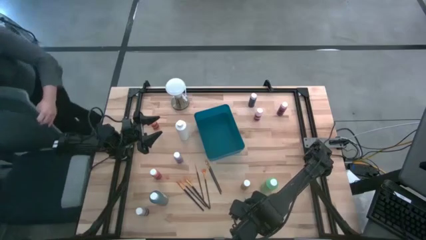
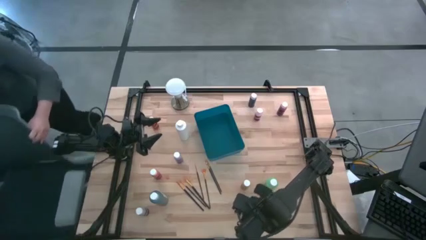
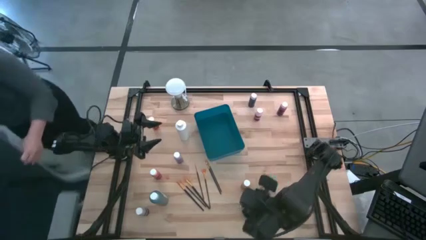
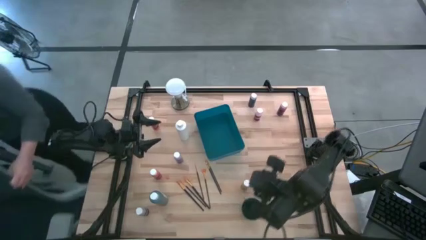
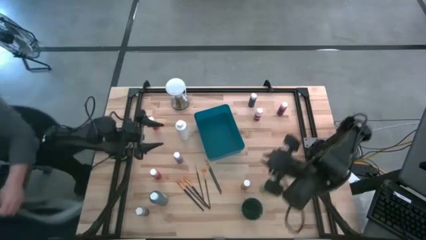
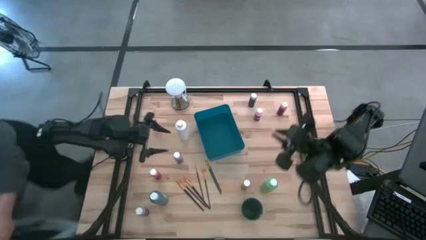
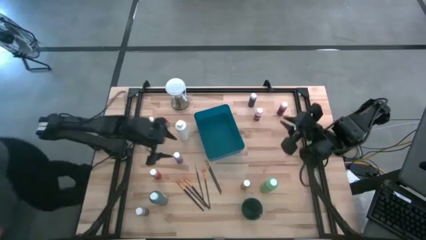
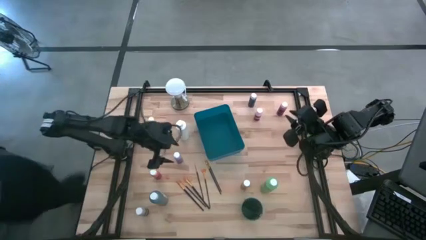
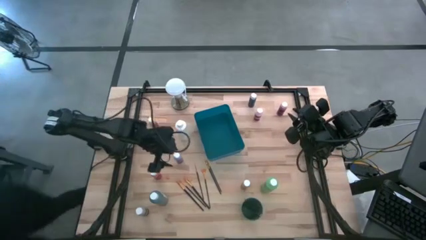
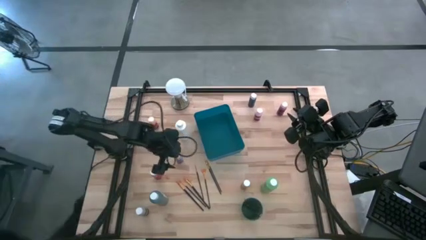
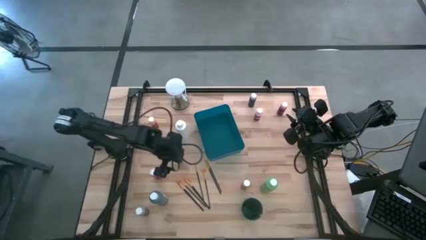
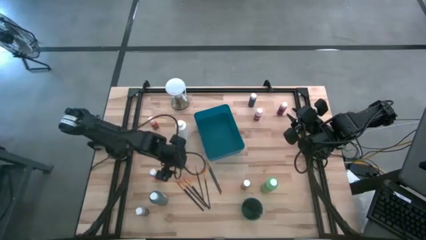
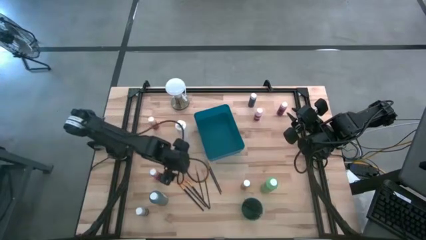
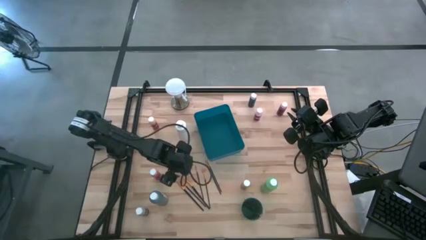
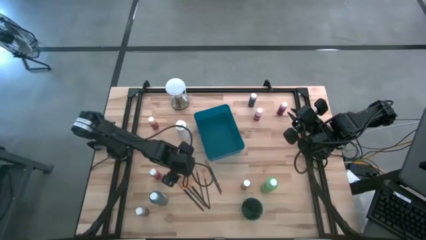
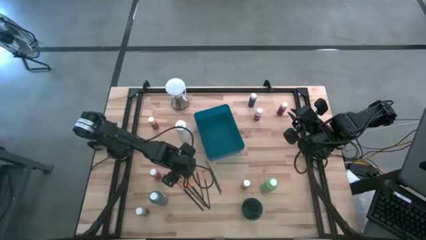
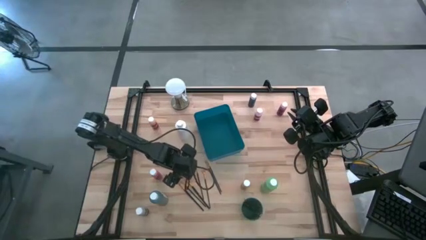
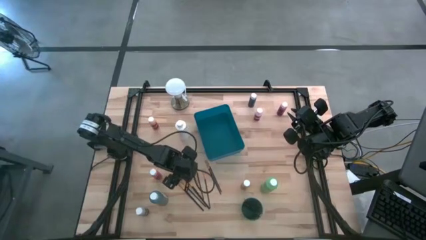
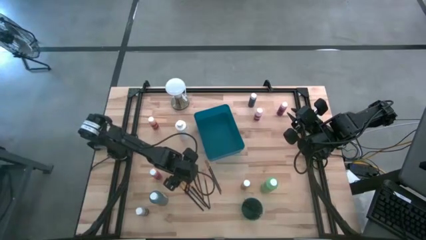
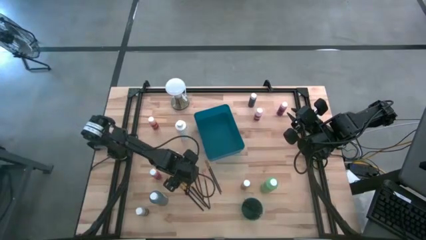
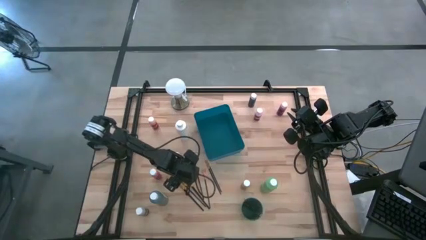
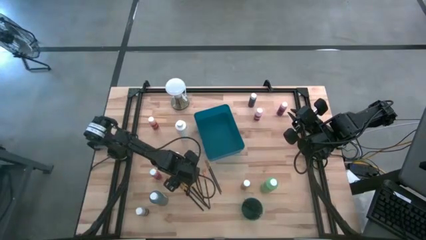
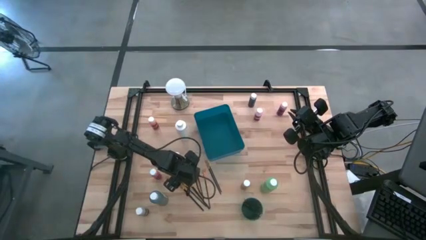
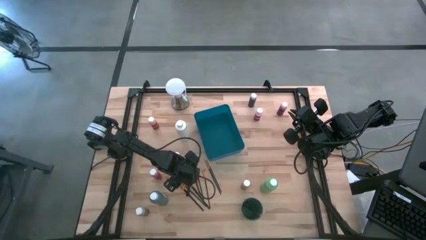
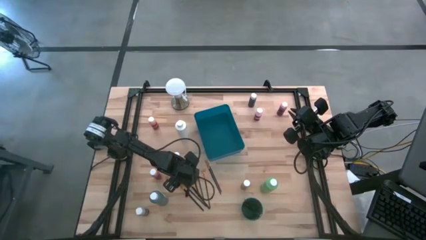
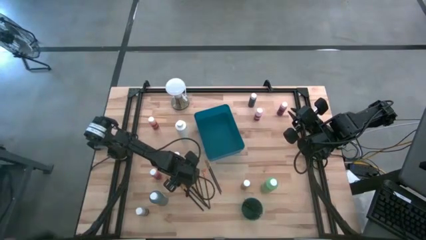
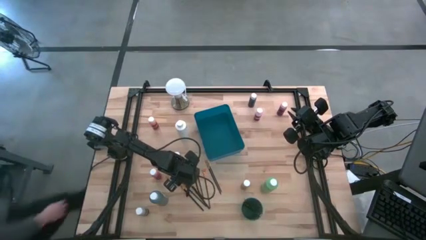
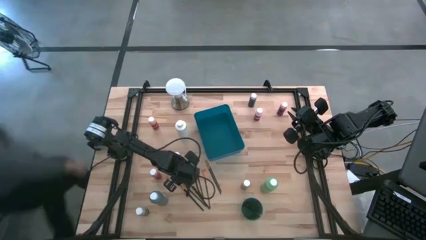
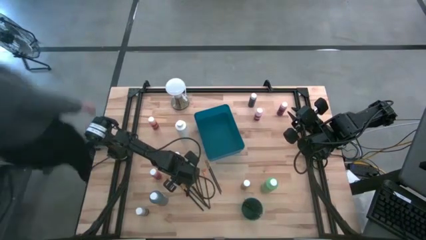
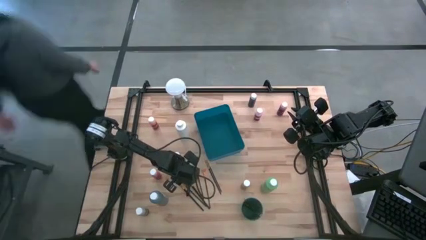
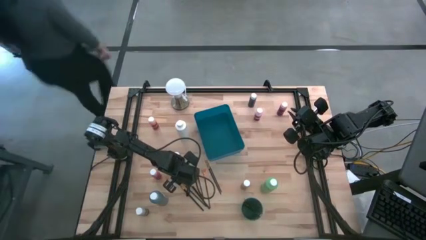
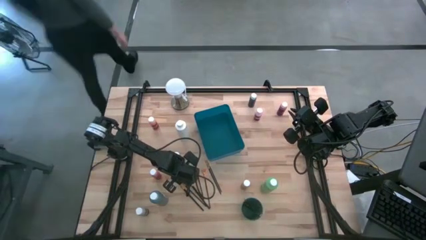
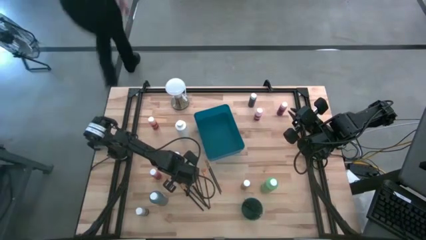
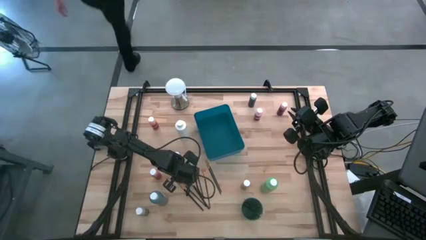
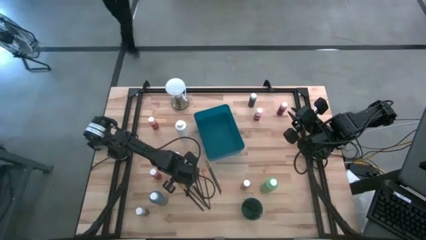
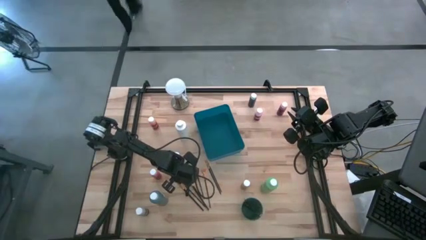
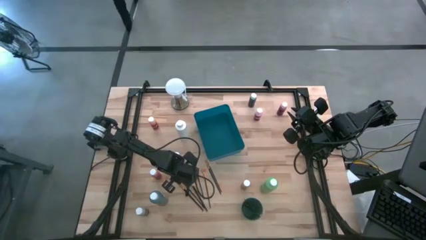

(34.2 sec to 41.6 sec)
Task: Pick & Place Paint Supplies
Put the gold paint brush into the green cup
